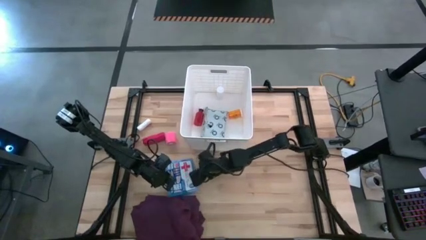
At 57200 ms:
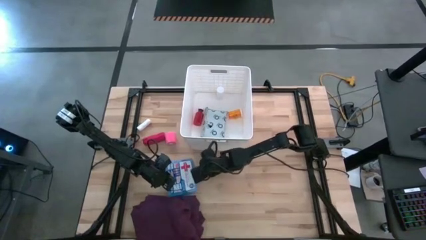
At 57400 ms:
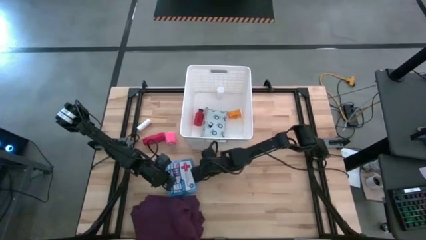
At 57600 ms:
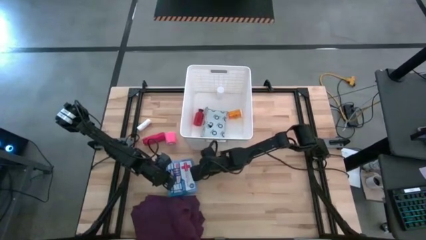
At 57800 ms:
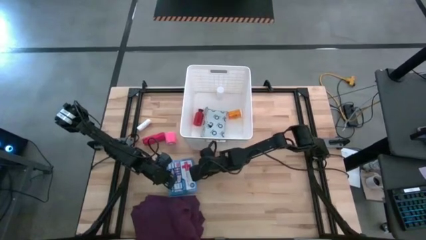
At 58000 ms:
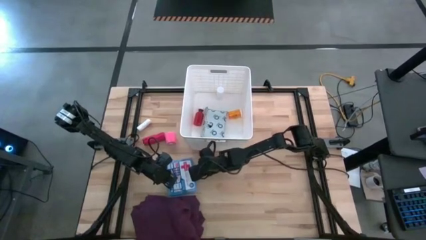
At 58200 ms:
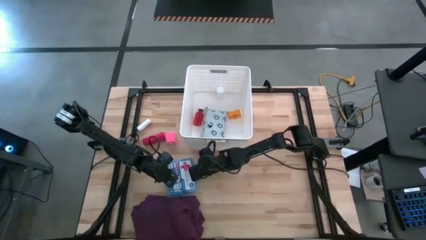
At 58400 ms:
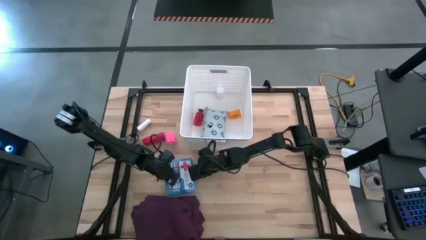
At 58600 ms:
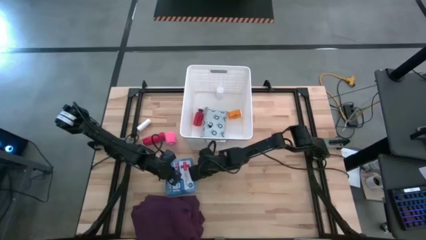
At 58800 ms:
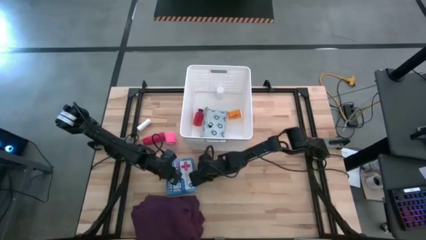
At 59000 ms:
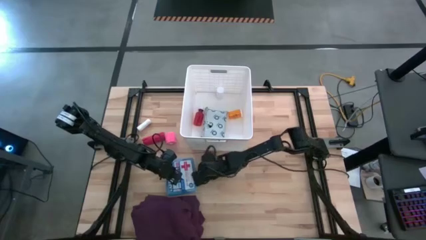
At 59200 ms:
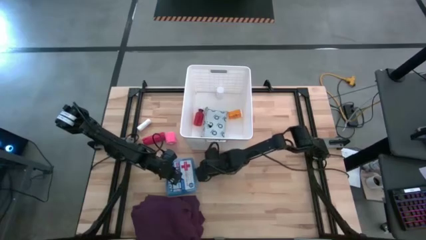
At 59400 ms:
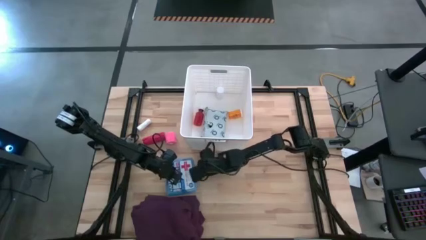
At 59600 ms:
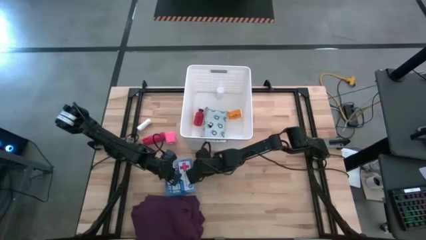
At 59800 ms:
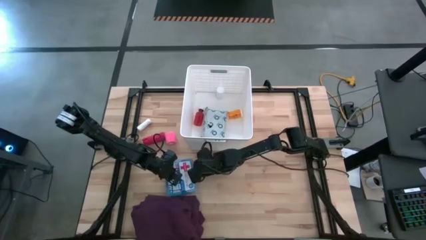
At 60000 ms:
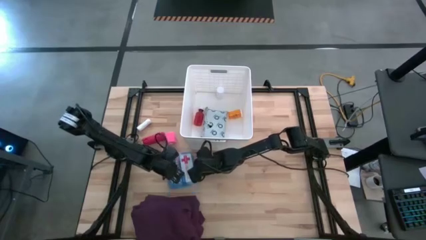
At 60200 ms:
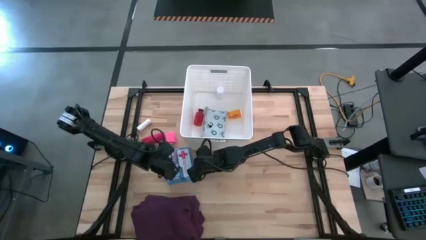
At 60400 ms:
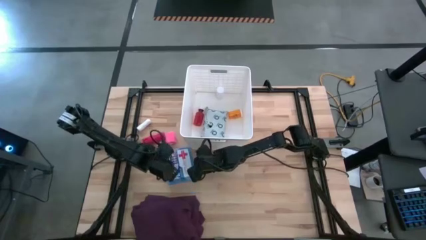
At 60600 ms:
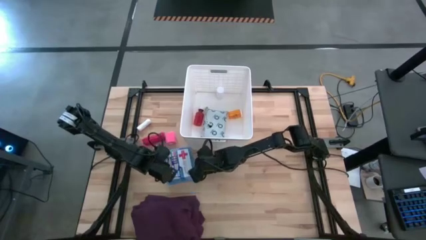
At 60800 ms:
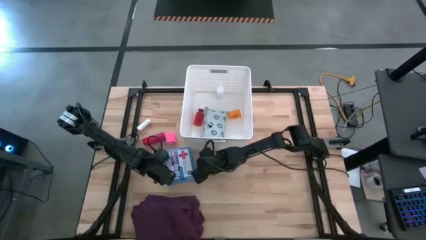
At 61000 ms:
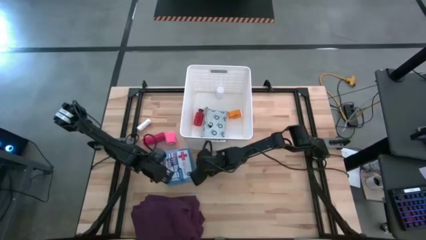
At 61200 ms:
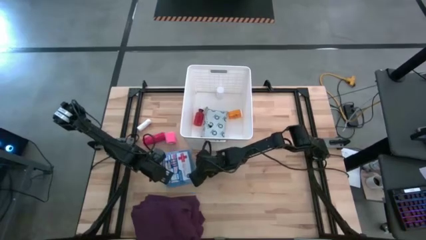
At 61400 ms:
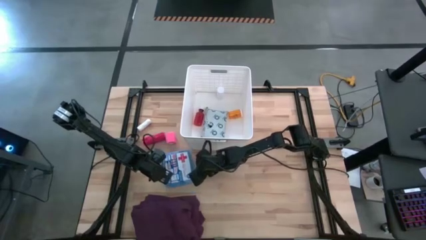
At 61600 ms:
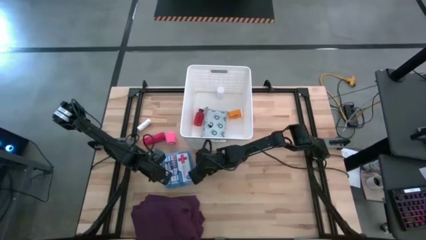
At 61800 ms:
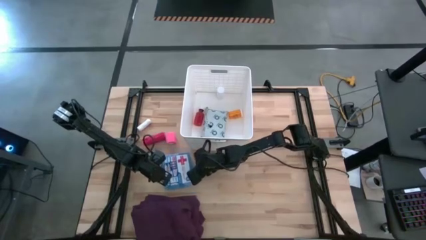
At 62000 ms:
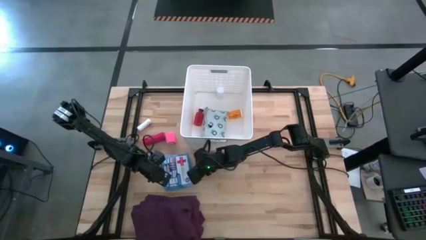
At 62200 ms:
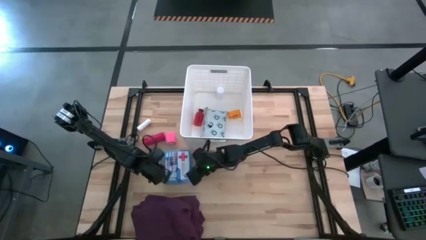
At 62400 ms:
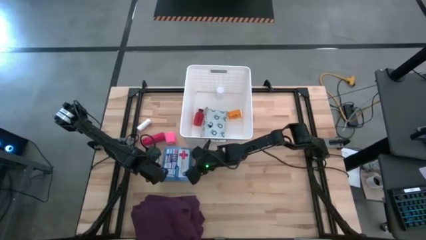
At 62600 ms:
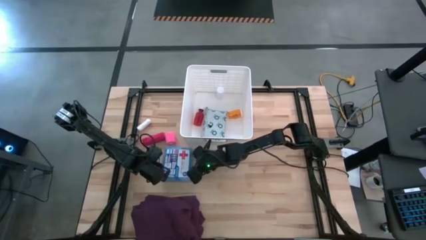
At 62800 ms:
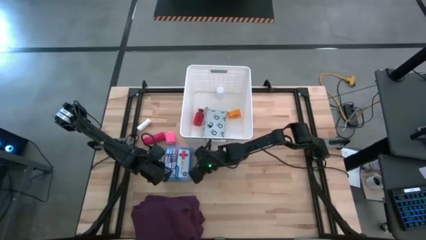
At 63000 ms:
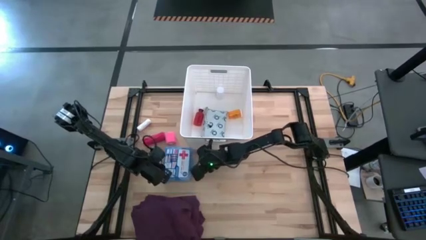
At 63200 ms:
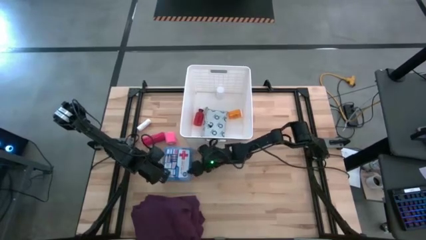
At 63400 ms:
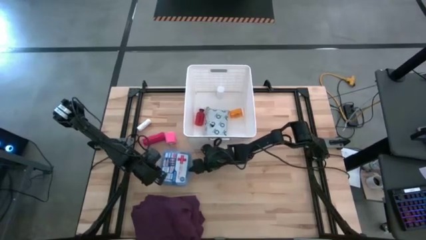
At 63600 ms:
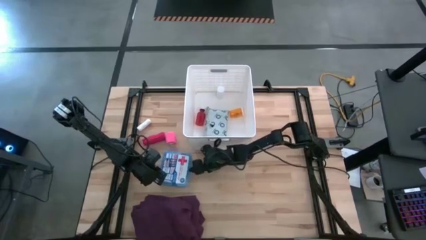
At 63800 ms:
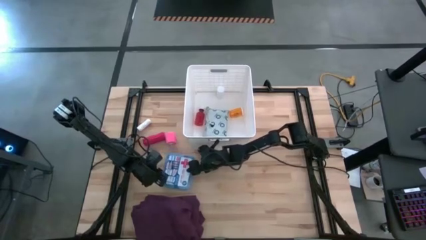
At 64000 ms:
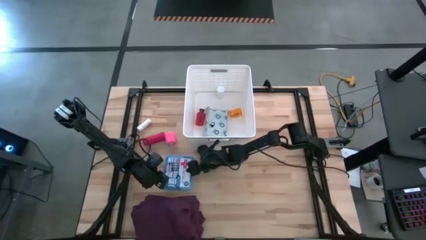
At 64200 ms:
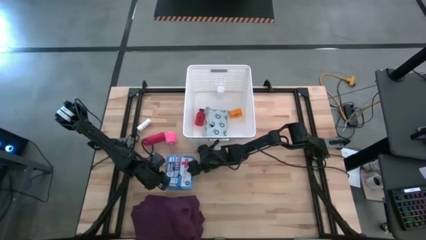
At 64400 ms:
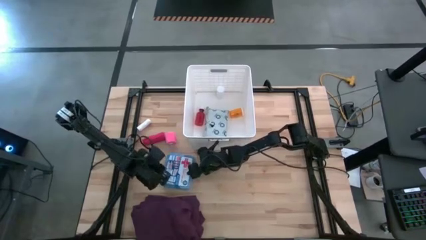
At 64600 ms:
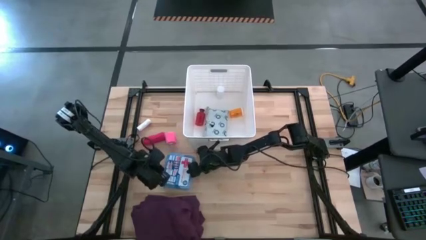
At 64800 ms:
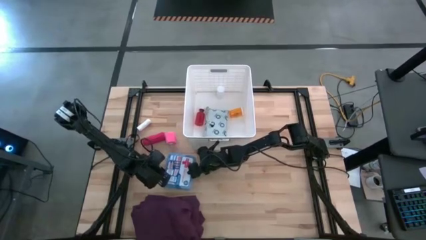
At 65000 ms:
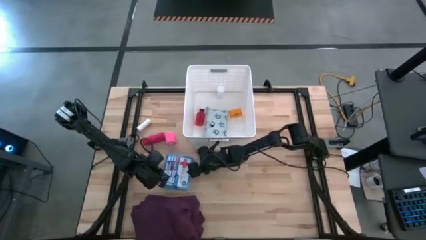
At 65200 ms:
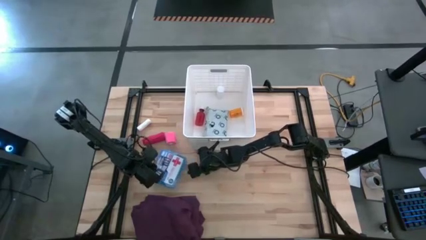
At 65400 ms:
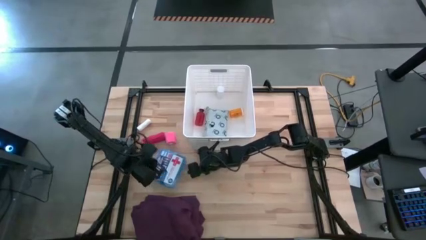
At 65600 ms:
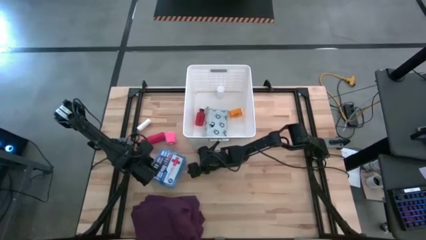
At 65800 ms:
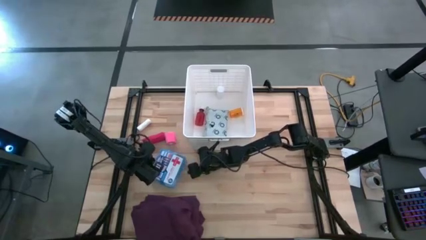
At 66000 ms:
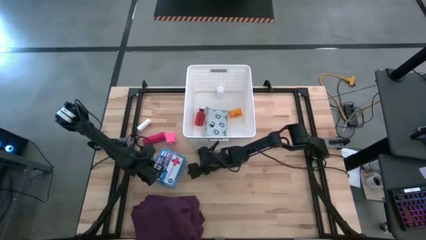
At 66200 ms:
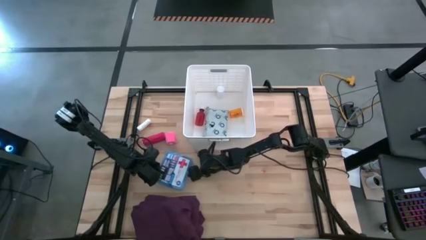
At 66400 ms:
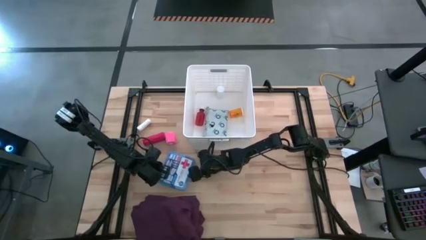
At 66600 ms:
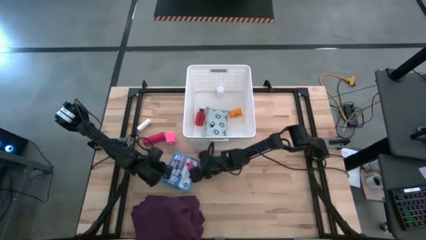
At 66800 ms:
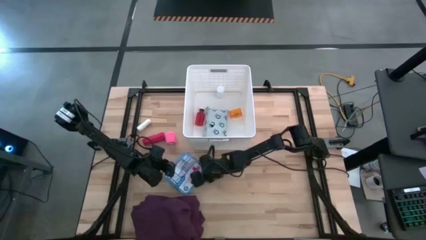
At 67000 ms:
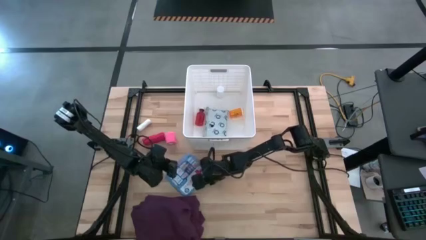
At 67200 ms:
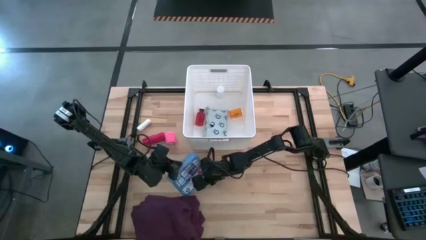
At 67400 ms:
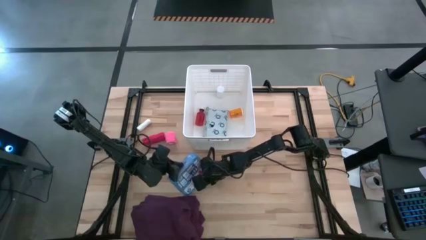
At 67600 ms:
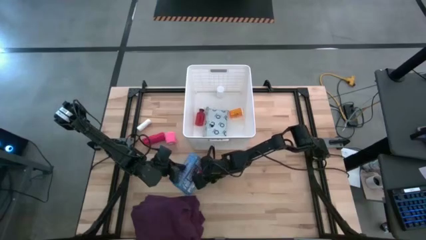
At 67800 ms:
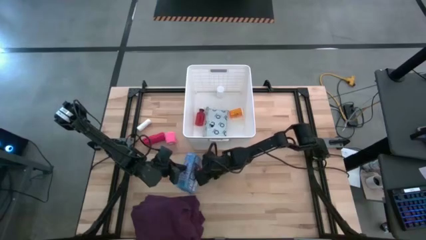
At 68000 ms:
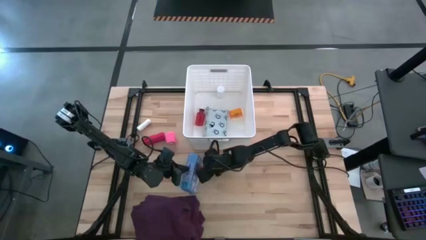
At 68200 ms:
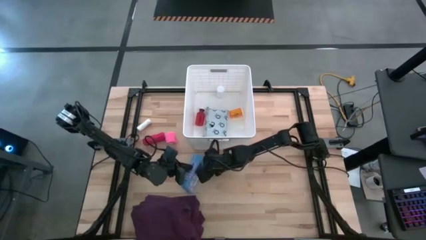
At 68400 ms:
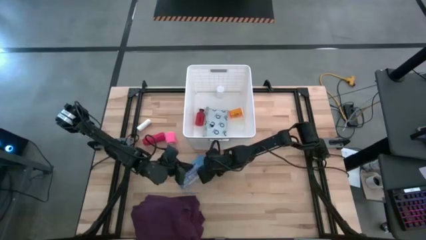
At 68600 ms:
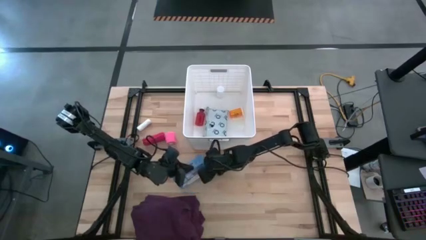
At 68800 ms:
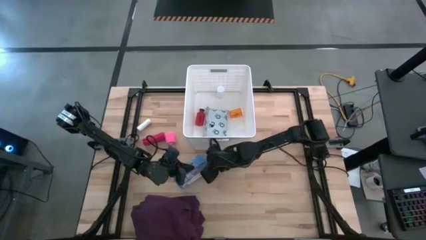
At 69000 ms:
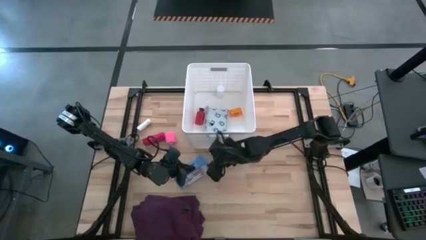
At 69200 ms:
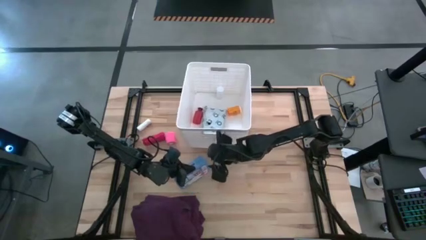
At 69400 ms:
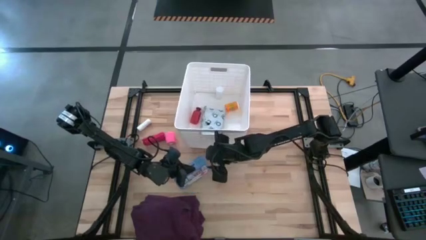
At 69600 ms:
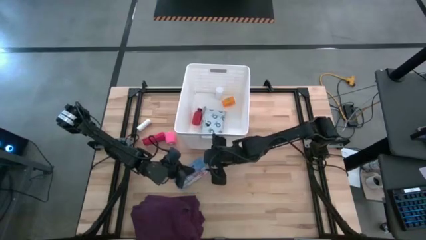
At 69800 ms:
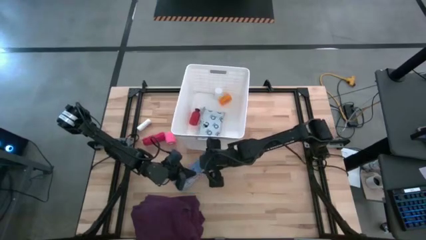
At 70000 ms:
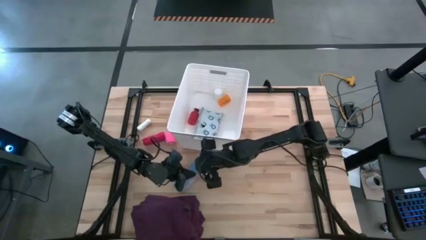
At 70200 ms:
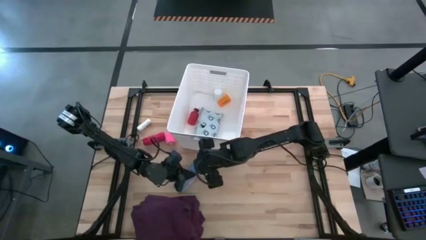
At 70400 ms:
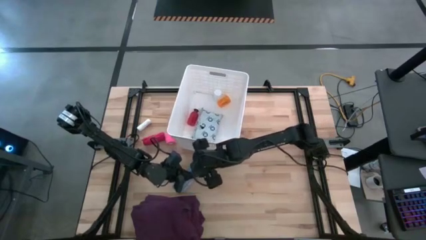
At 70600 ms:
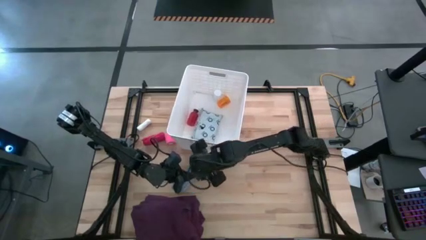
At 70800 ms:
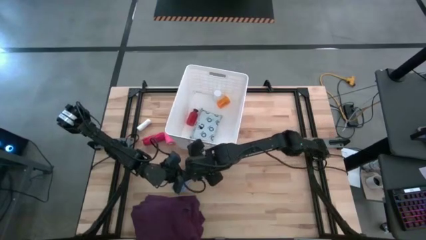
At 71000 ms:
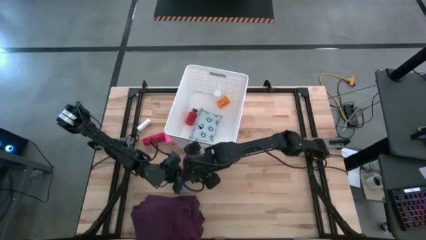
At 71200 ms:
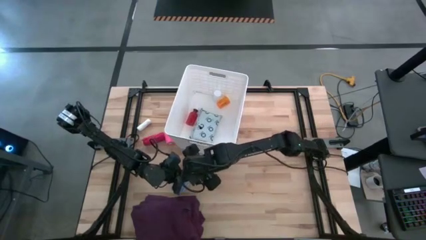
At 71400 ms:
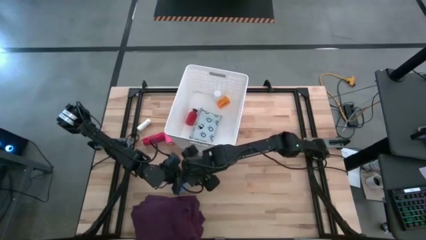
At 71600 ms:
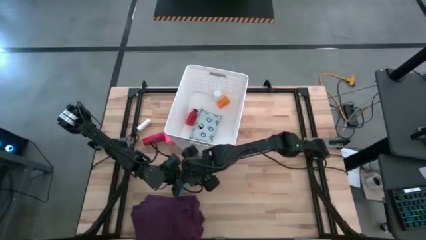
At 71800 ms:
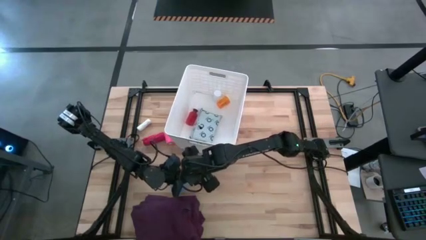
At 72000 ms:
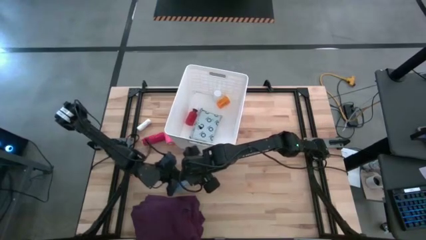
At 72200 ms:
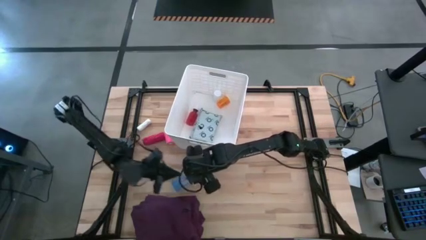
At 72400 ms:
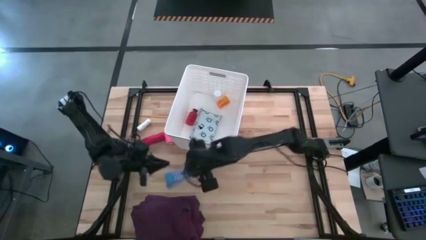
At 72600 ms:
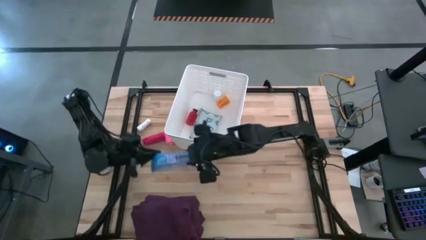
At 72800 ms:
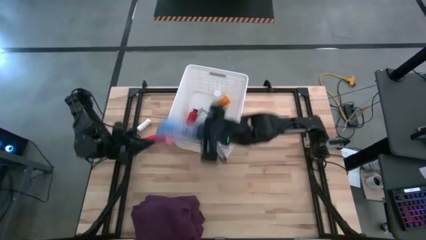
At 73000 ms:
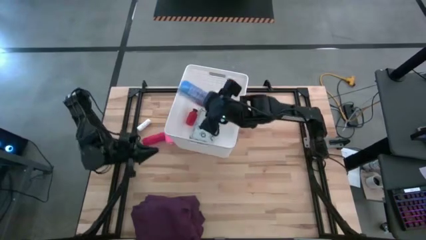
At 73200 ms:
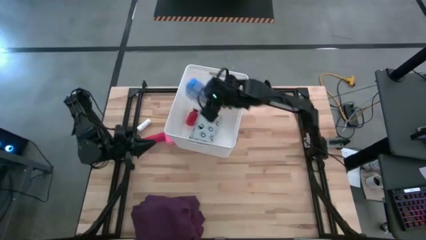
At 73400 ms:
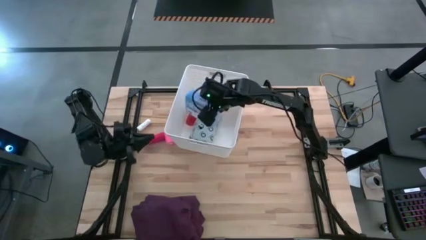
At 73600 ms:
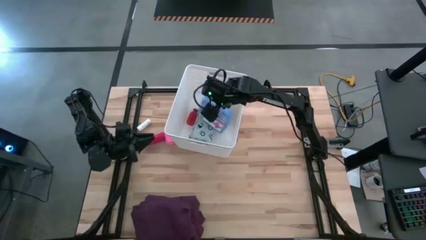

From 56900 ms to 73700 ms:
Task: Pick & place medical supplies in basket/bin
Put the blue first aid kit into the white bin
